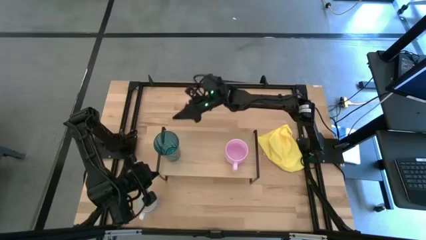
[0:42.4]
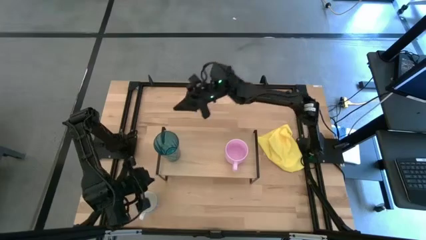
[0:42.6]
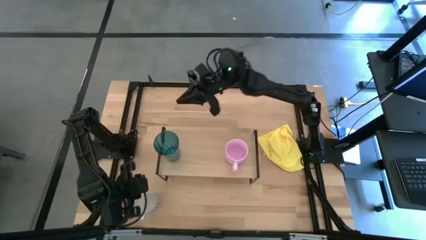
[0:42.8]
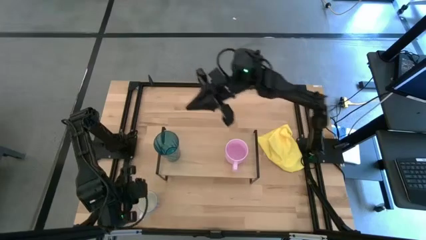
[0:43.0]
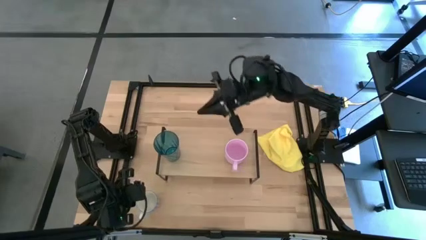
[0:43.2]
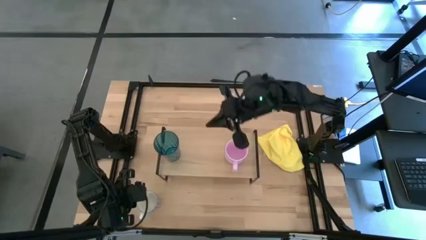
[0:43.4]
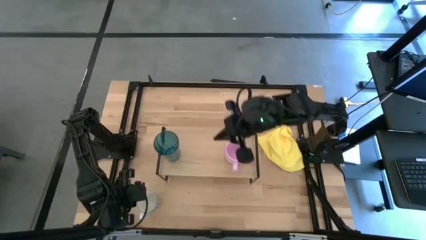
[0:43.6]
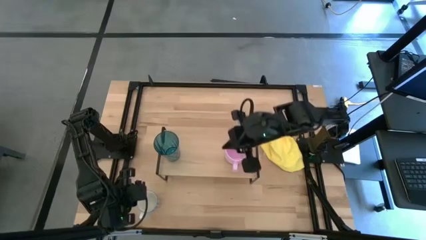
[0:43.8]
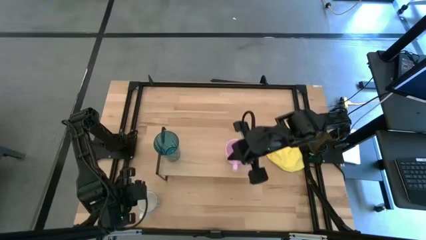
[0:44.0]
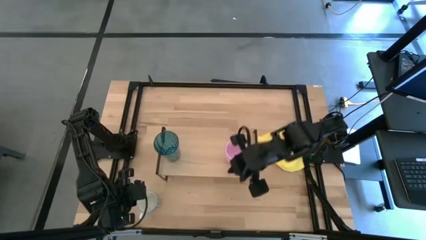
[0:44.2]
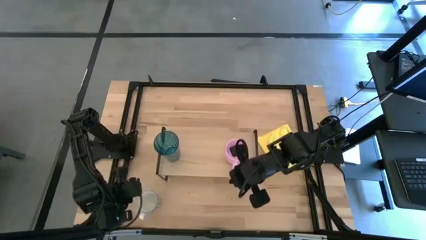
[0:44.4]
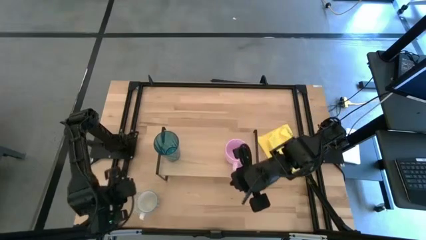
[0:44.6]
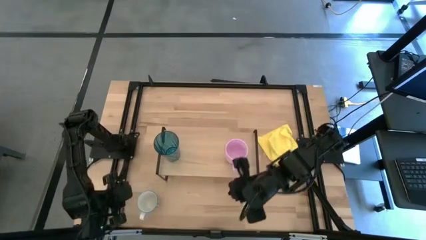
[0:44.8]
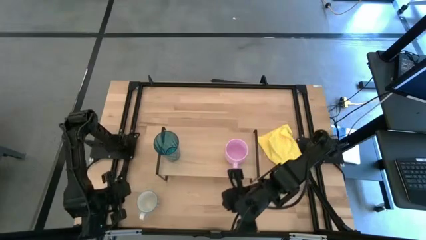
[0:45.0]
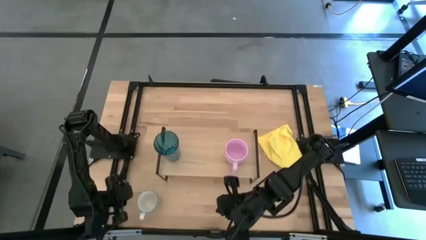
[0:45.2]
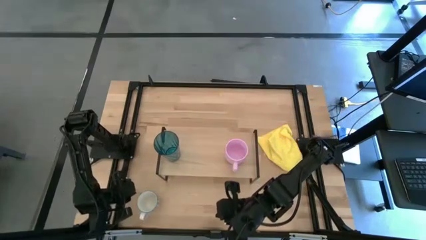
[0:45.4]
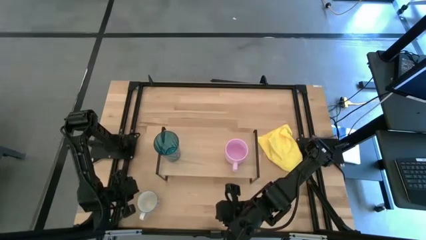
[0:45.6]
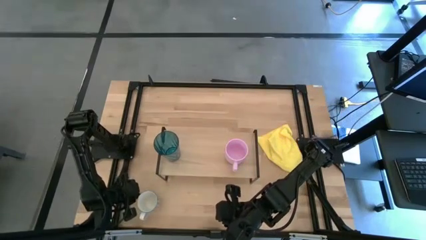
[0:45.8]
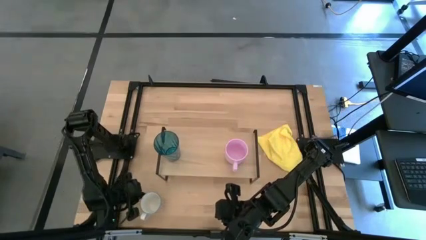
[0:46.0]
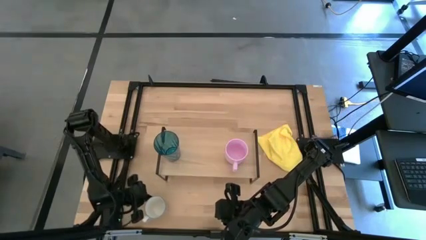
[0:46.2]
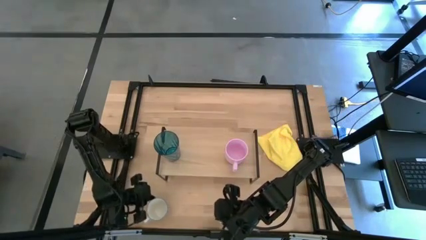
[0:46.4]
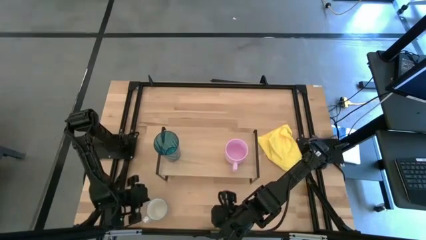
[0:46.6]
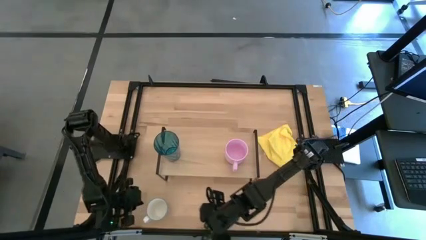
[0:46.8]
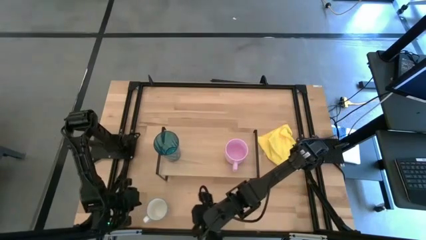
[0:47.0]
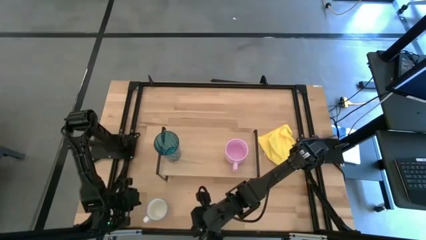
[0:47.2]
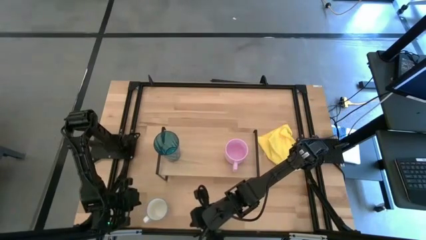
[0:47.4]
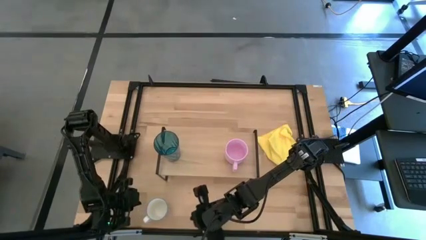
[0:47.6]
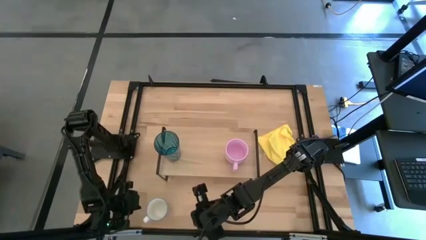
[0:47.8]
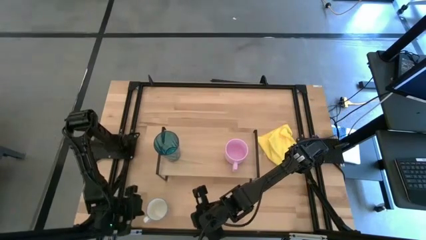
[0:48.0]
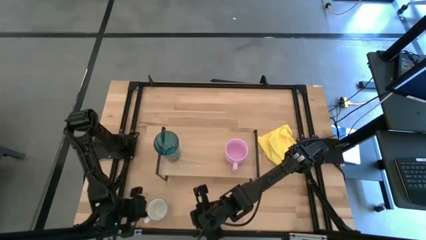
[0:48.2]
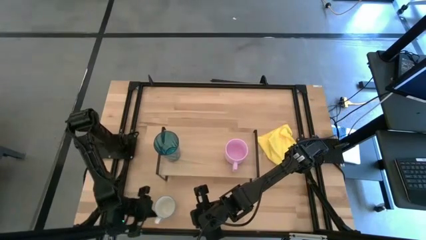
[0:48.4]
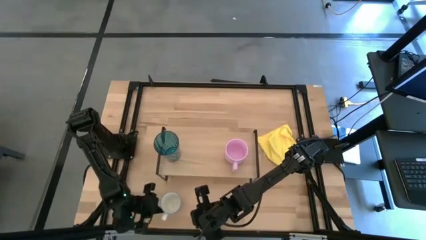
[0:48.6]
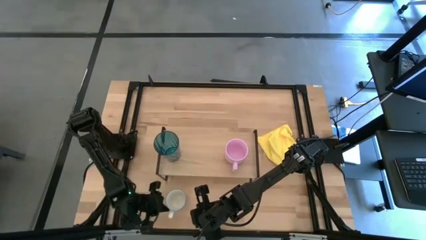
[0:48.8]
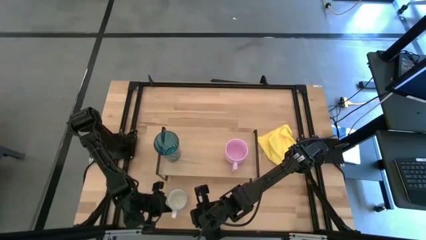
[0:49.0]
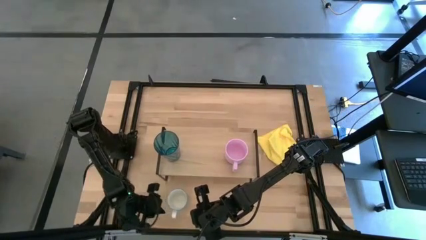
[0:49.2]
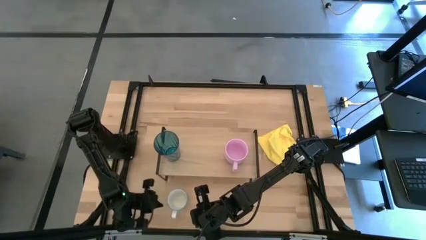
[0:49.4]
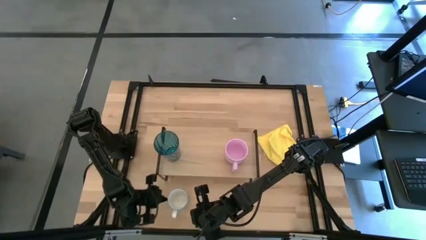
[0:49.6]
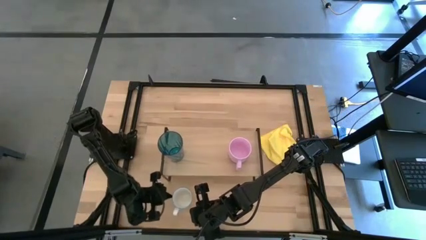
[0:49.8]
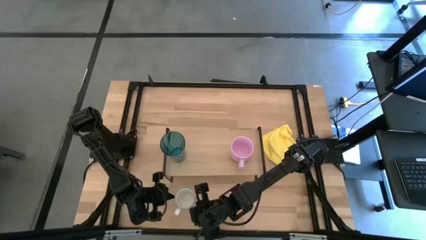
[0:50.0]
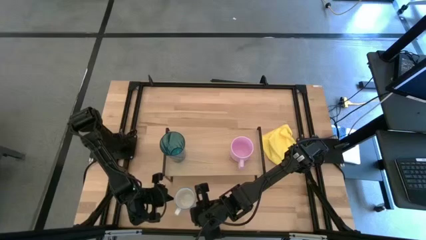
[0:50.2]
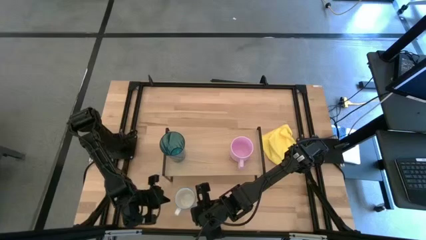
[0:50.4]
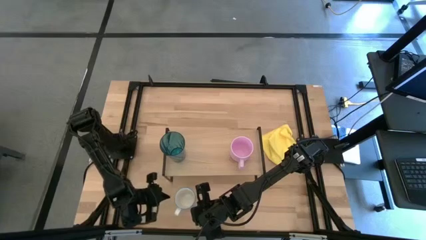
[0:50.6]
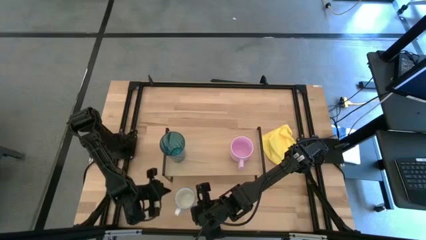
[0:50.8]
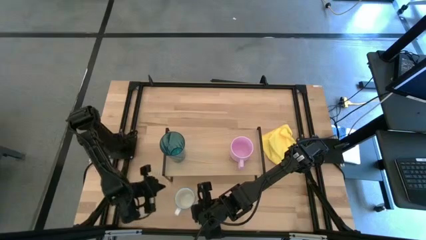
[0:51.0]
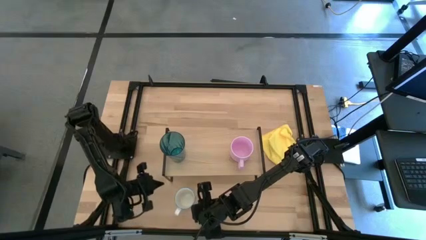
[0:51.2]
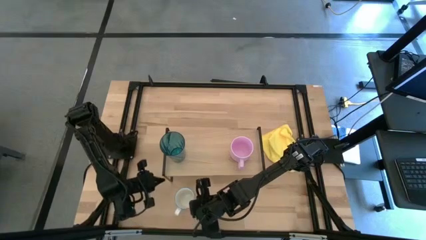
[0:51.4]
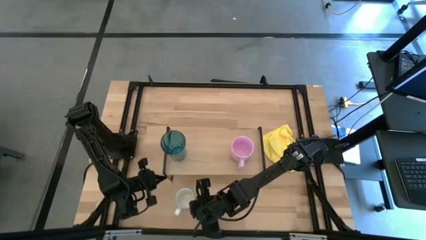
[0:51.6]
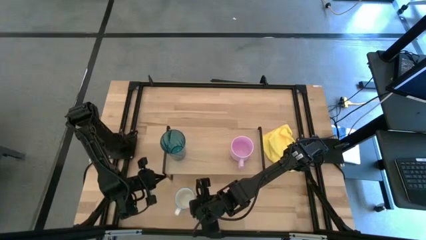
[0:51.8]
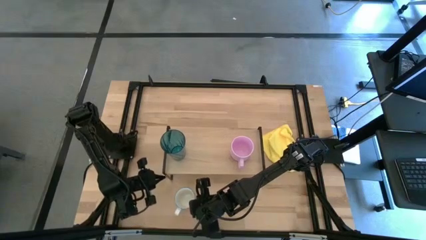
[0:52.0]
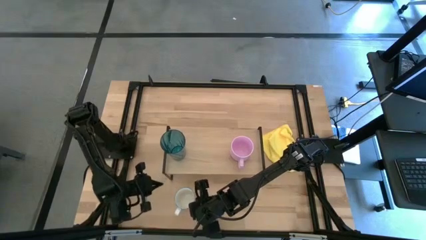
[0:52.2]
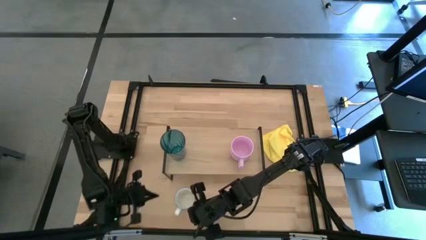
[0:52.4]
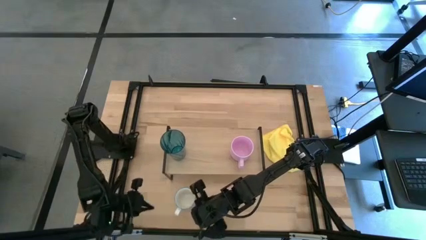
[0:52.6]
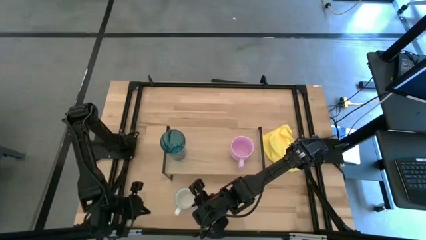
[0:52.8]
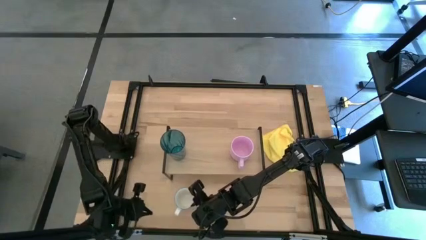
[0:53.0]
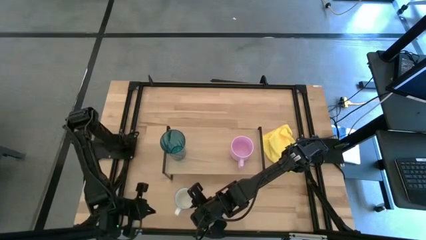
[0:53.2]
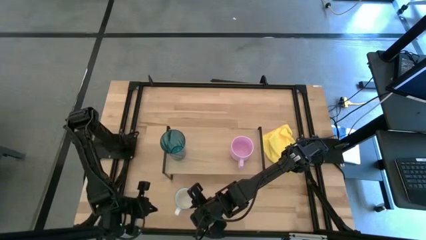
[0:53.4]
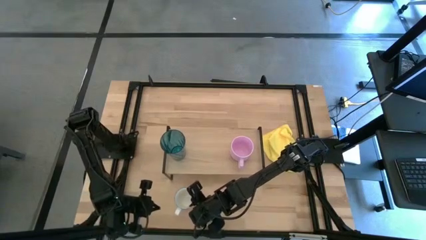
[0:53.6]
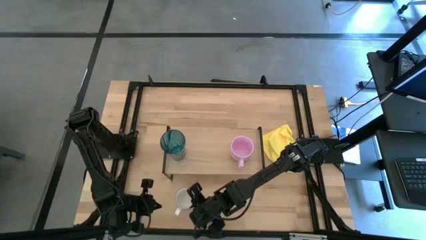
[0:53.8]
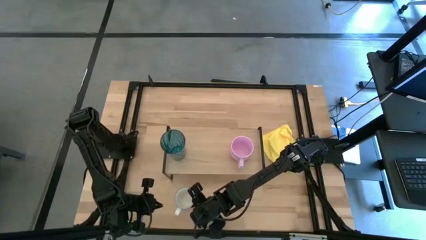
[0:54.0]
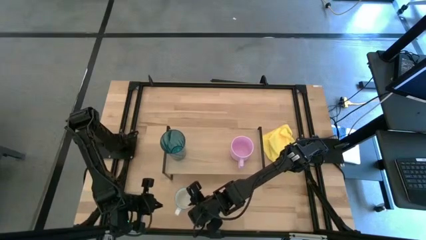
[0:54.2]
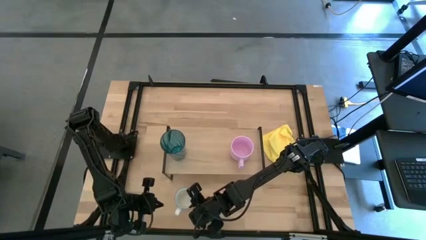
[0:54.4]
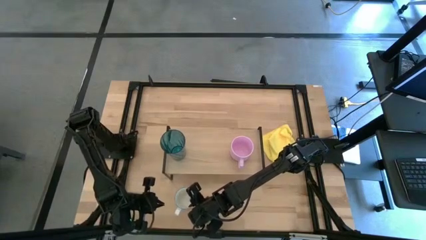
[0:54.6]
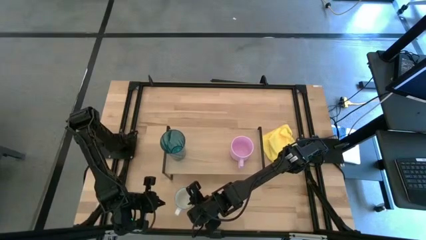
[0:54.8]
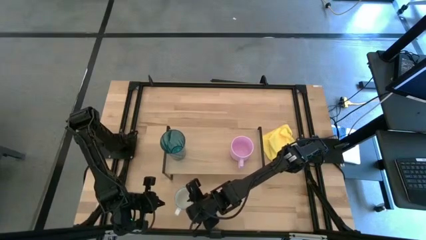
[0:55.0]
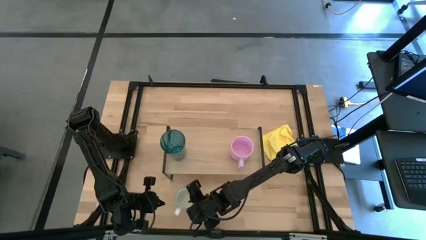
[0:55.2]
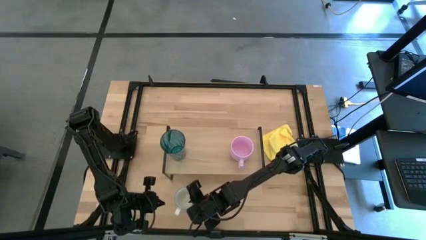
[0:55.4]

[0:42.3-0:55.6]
Task: Stack small to large cups/mugs on shelf
Put the red cup on the shelf
